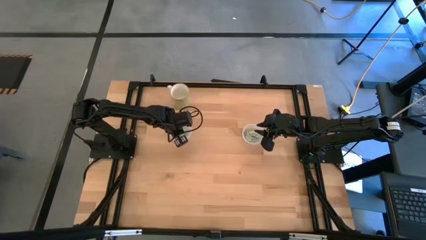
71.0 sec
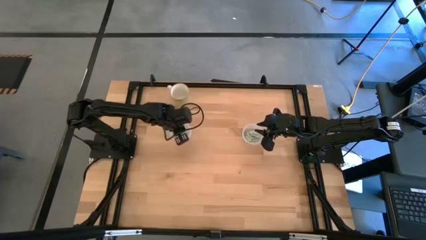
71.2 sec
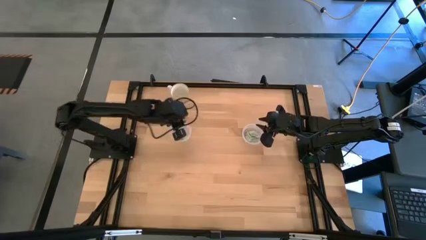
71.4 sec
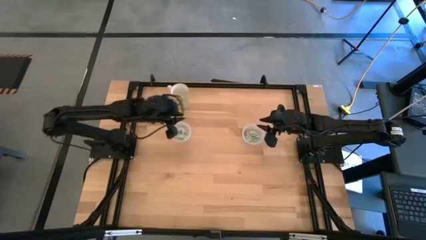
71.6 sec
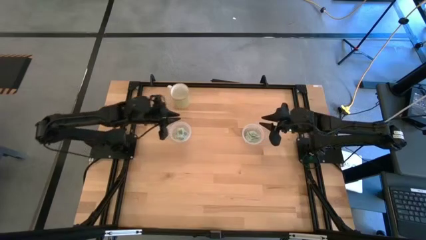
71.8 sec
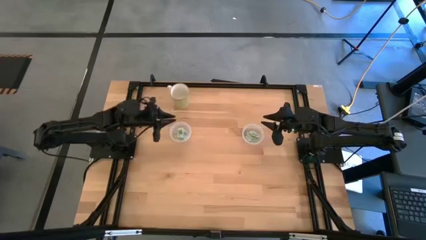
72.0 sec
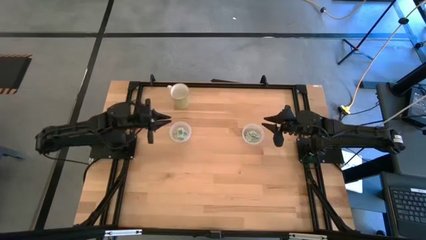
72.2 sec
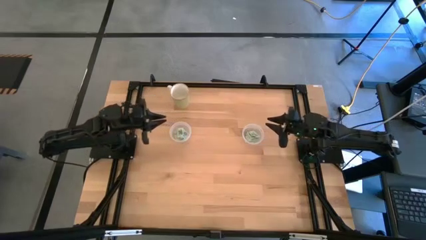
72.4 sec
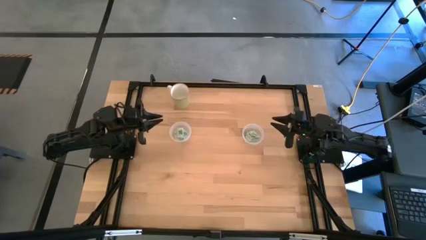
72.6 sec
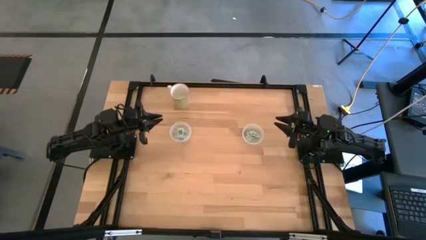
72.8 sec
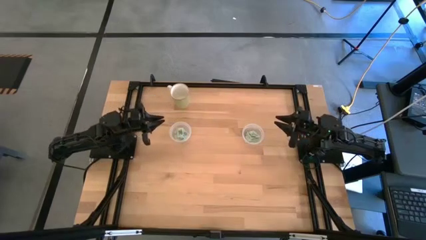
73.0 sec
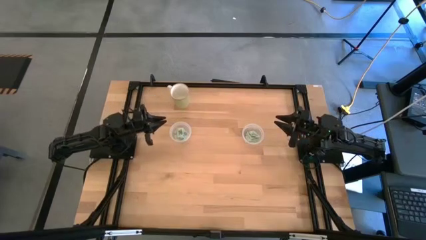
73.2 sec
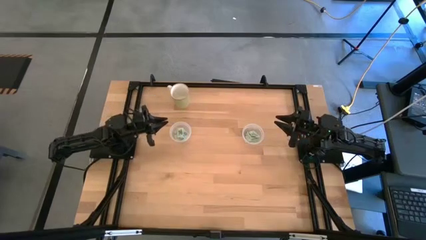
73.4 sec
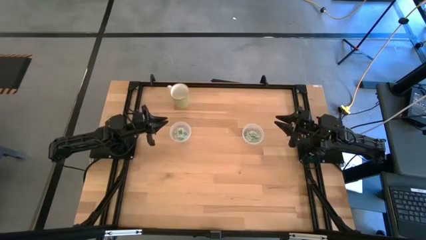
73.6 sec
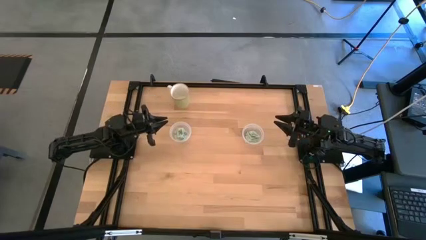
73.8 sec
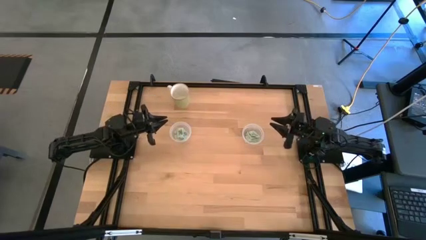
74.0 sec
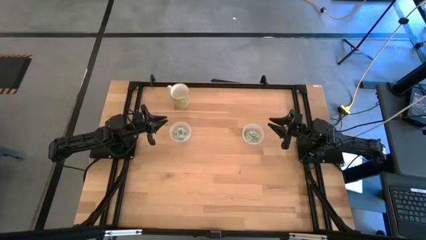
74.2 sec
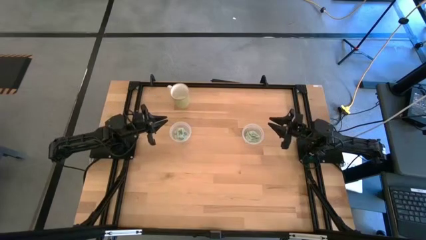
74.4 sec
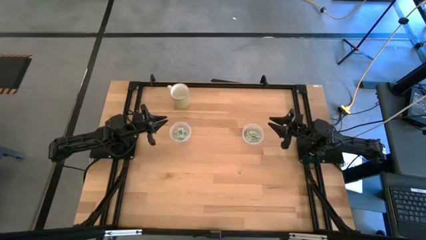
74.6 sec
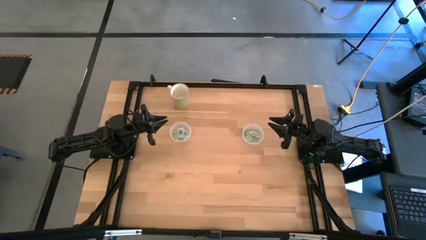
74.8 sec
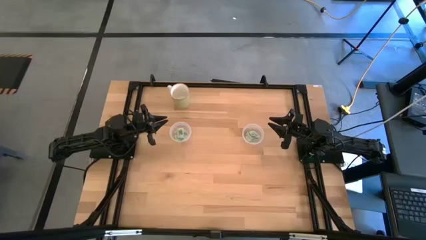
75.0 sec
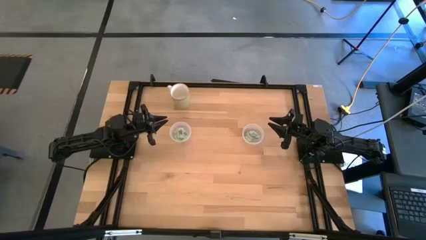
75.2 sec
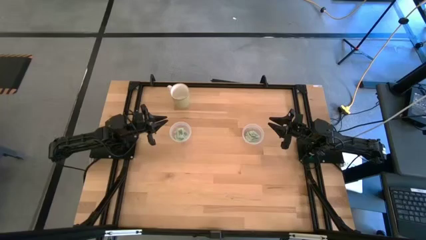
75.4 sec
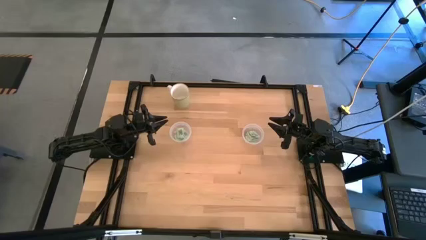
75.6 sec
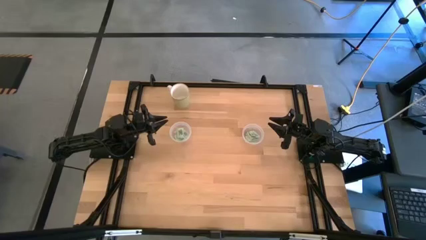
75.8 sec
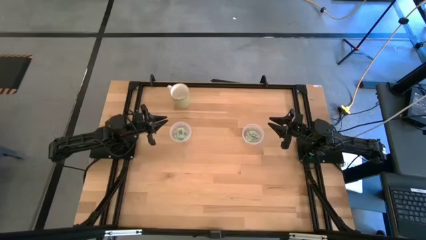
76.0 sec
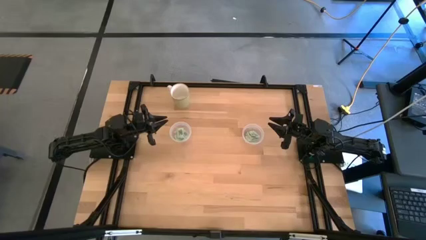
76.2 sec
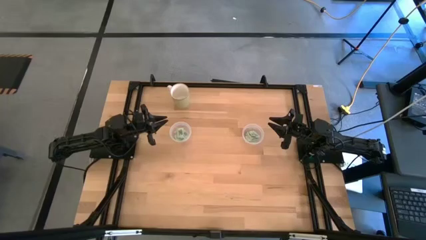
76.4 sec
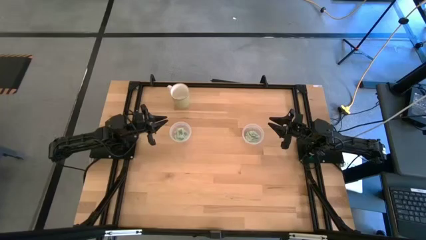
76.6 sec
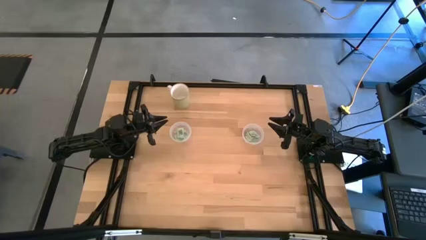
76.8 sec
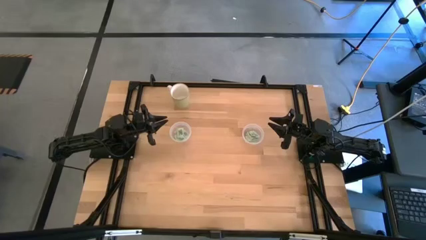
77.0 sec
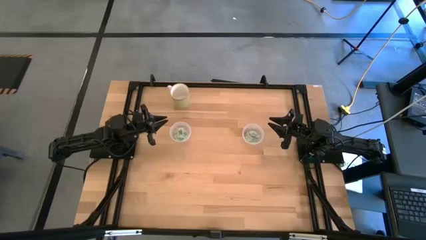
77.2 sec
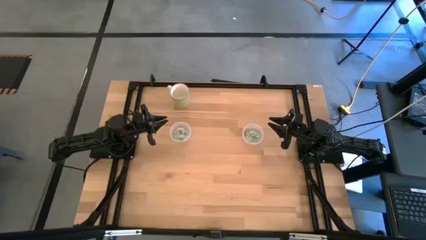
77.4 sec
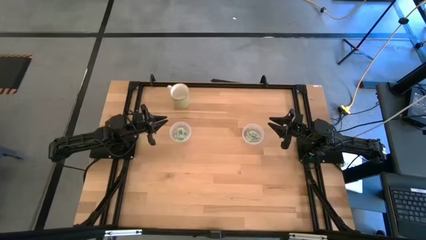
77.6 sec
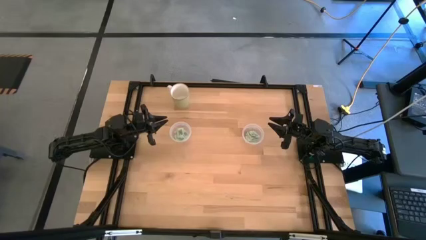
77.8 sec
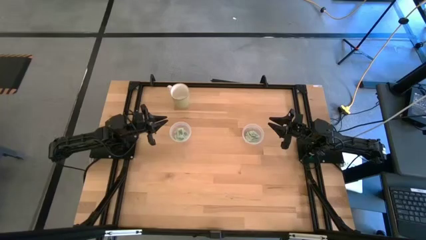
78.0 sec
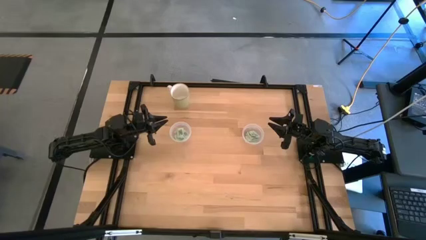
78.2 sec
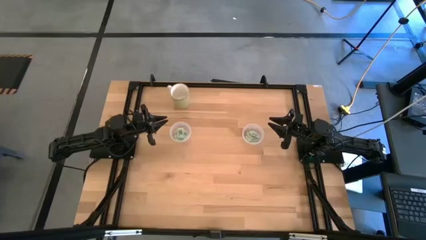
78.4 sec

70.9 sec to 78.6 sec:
Task: Pick and place Stevia / Truvia into bins
Return to Home Position

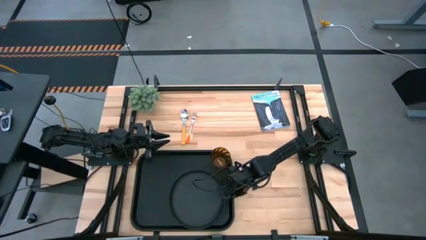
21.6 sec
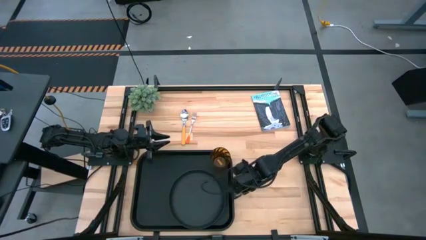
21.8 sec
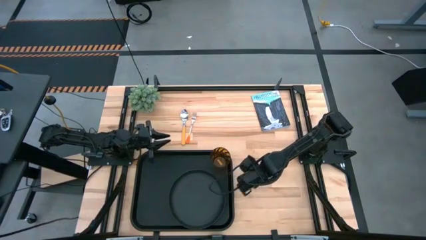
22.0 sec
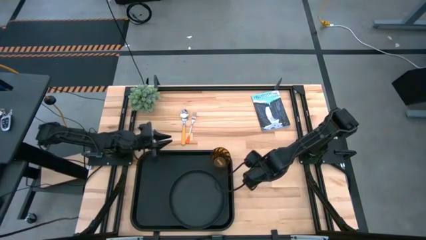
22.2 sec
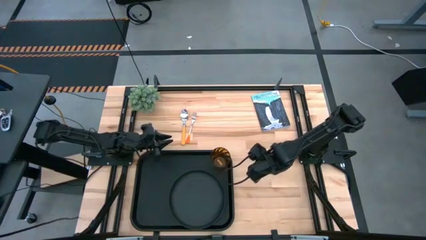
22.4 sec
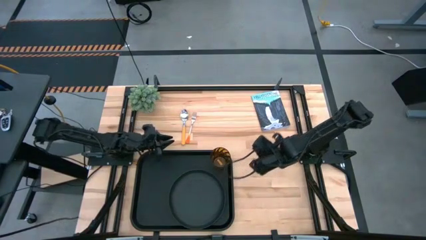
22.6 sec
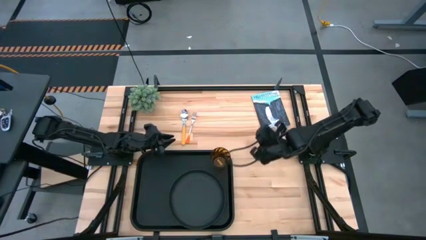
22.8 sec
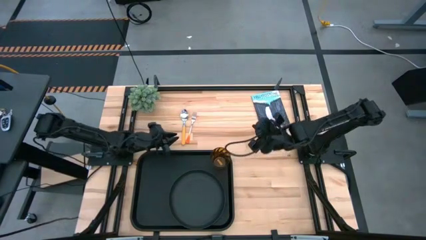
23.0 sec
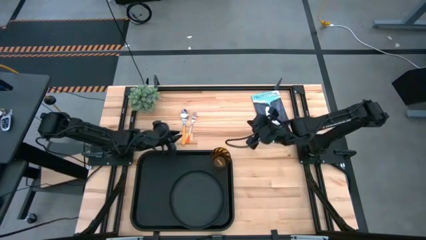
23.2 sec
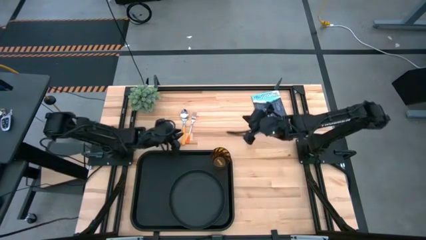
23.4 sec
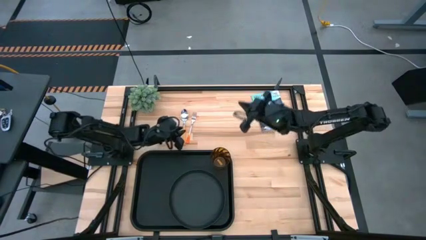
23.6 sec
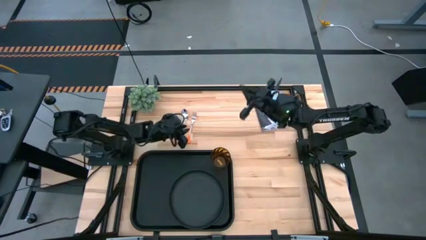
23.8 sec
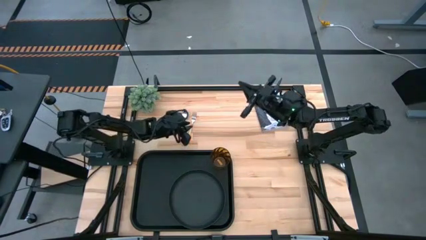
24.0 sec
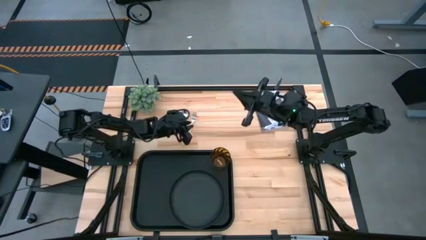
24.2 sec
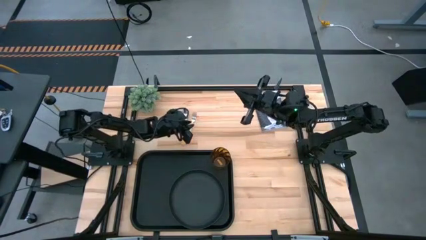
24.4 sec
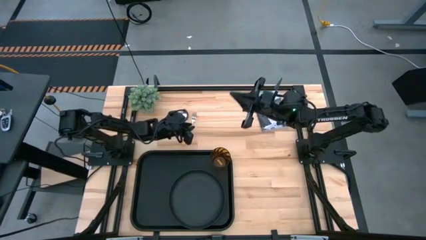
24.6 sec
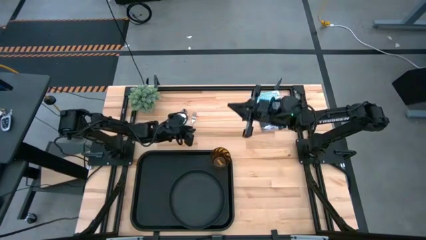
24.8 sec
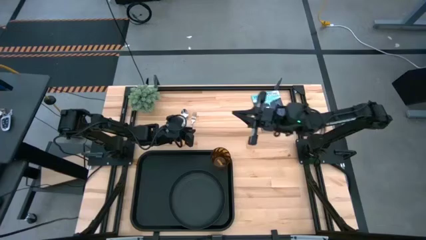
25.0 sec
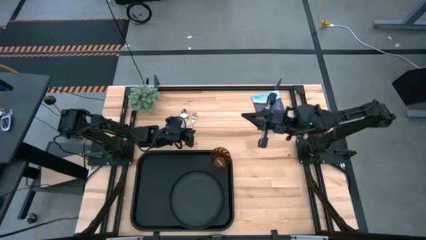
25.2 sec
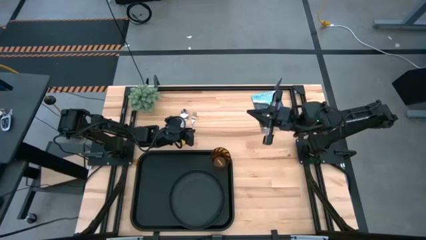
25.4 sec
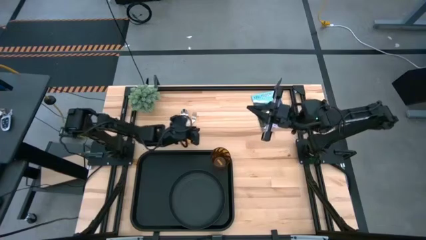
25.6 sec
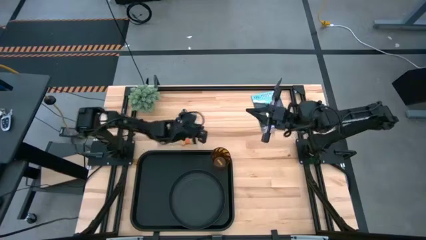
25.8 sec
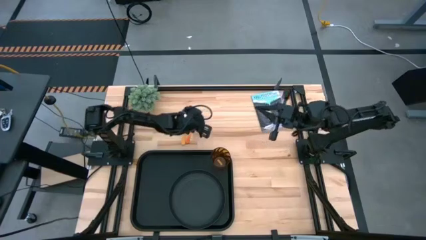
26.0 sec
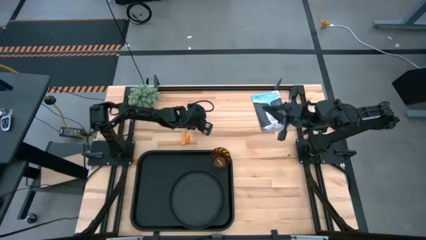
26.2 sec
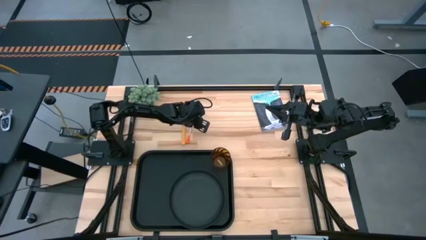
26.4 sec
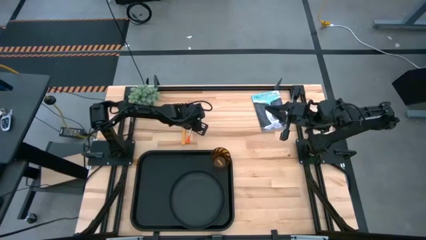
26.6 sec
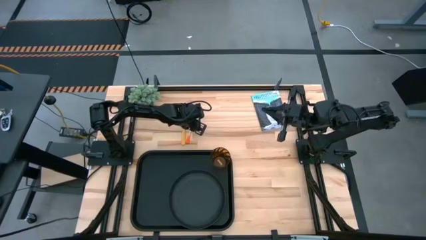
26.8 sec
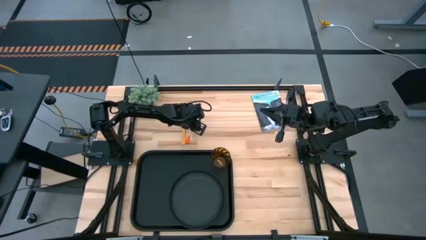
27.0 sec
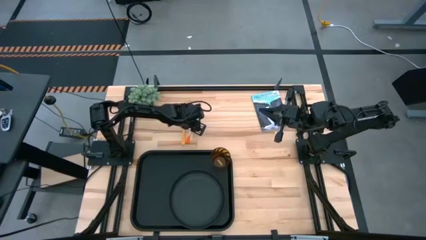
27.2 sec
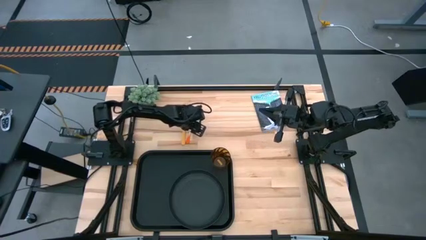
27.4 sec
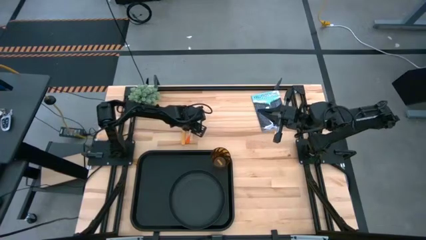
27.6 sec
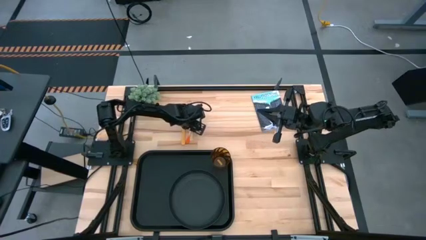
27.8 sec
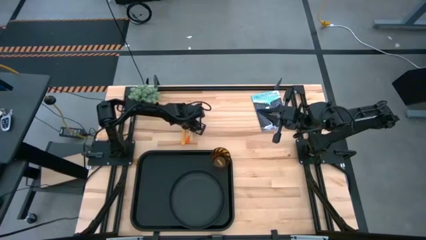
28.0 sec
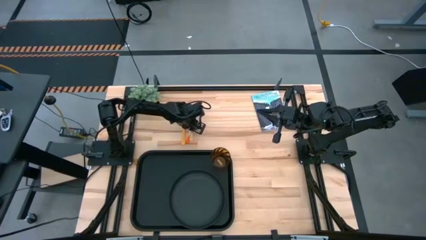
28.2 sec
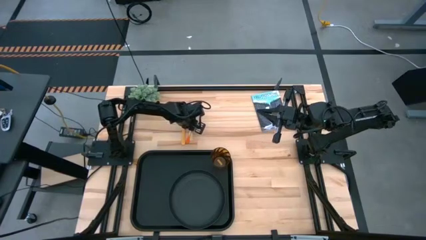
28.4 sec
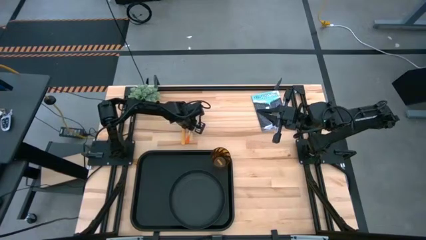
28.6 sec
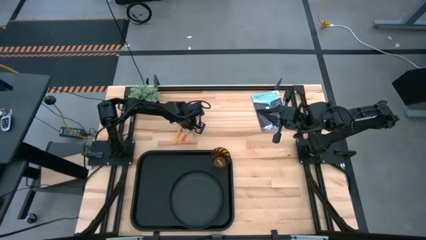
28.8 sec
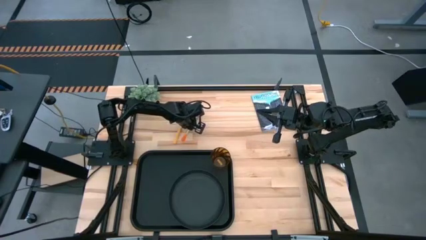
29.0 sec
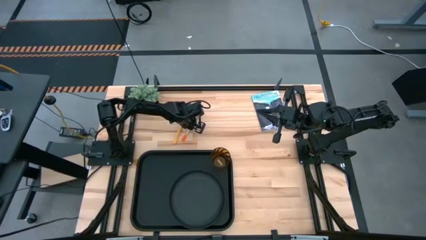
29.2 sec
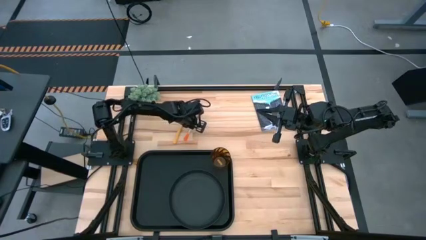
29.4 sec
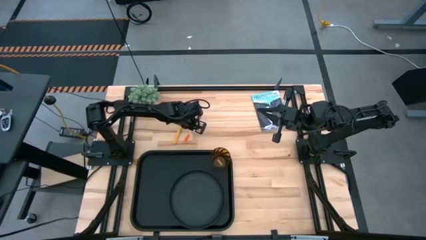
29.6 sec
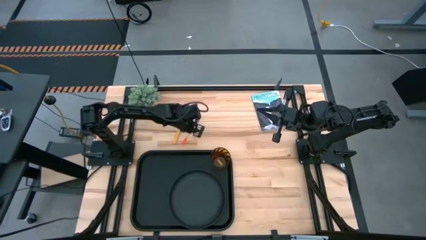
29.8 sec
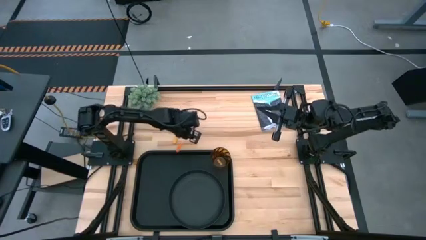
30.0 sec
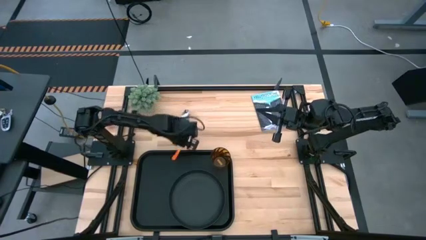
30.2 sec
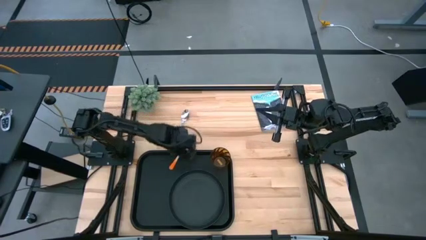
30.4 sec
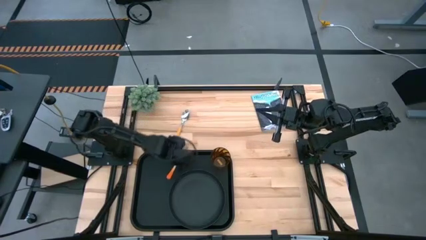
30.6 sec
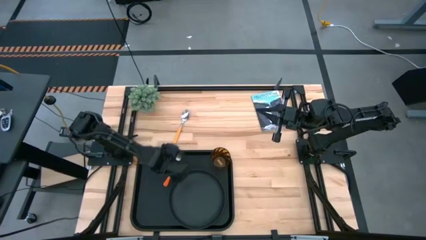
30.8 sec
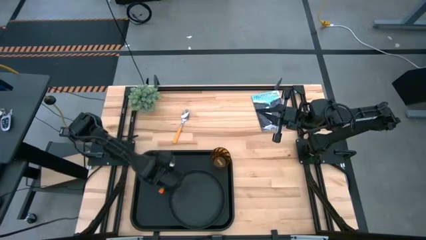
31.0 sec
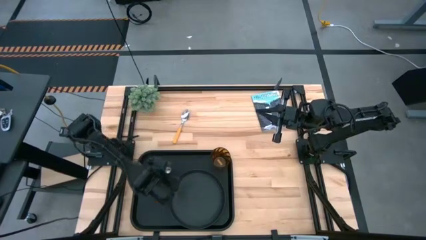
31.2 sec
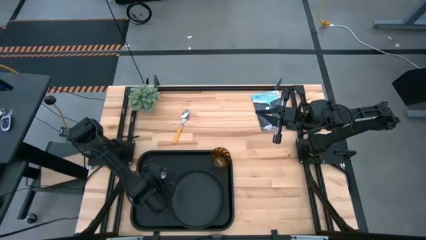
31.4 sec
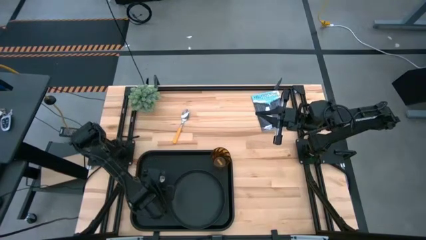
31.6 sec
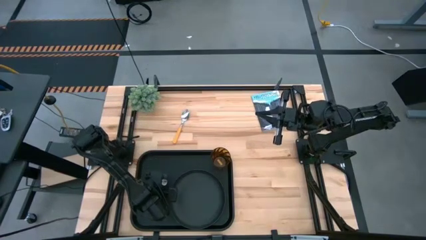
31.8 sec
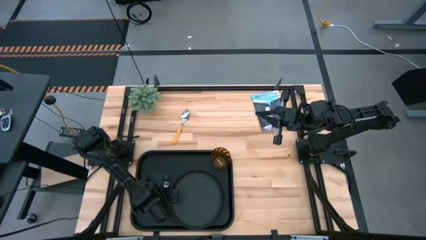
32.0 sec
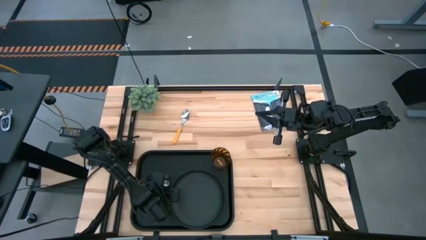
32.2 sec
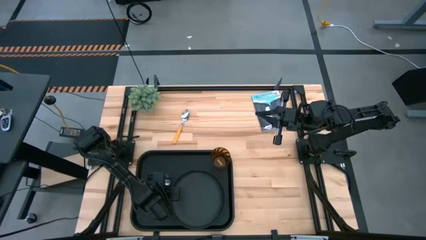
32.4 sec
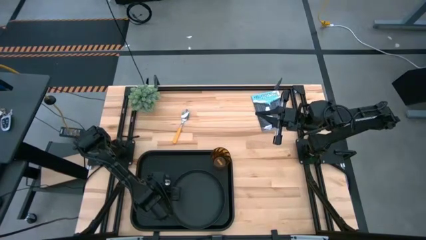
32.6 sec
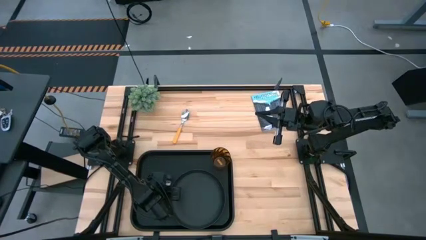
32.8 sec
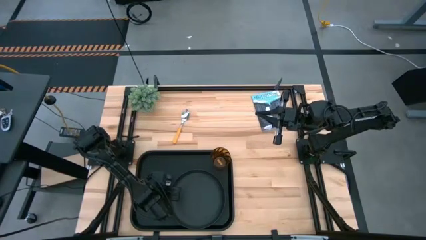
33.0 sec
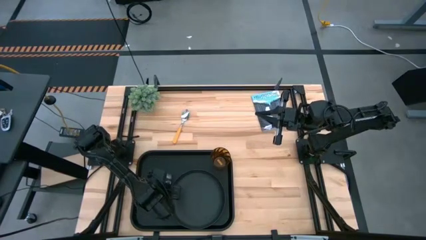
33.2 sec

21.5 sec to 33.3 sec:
Task: Pick and place plate/cup/fork/spoon on tray
Put the orange fork on the black tray to the left of the black plate
